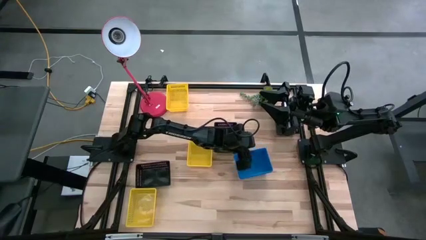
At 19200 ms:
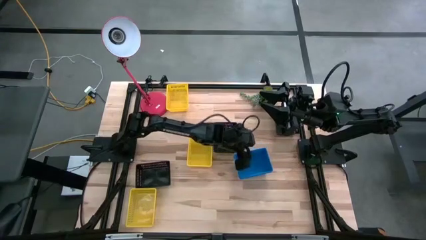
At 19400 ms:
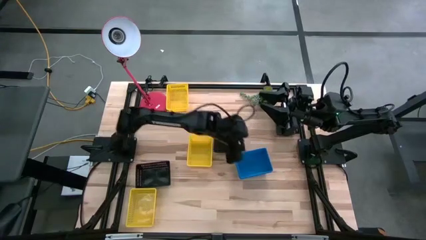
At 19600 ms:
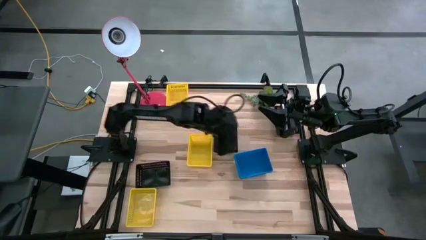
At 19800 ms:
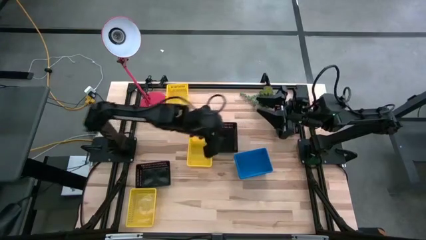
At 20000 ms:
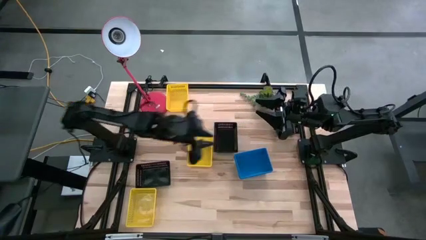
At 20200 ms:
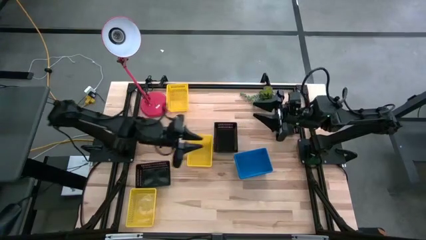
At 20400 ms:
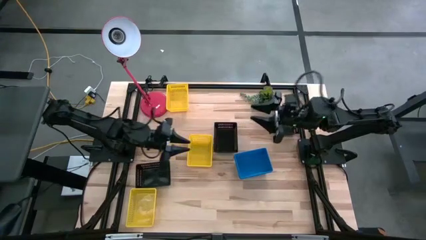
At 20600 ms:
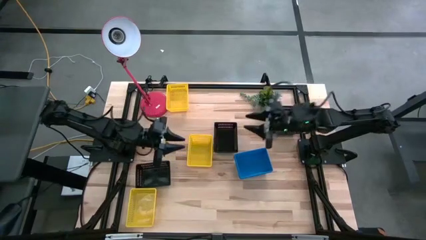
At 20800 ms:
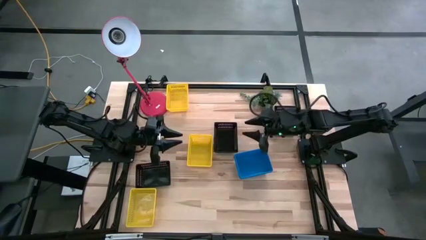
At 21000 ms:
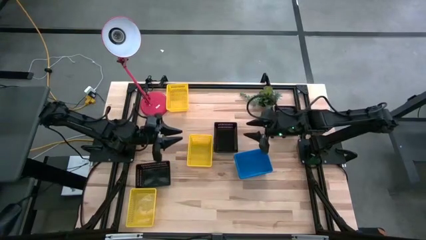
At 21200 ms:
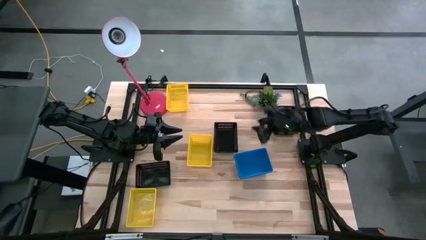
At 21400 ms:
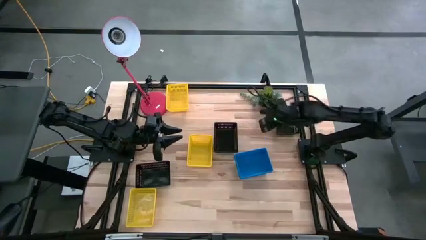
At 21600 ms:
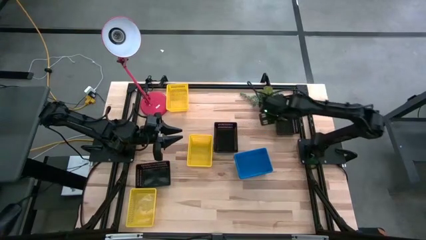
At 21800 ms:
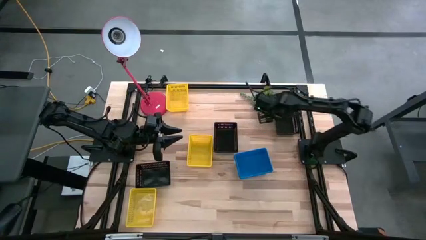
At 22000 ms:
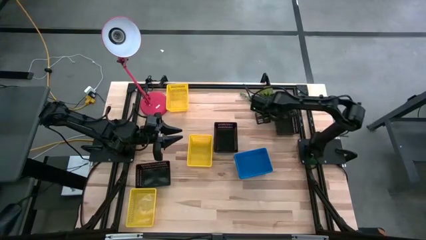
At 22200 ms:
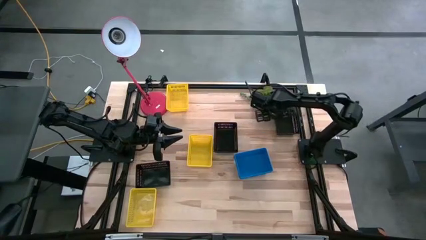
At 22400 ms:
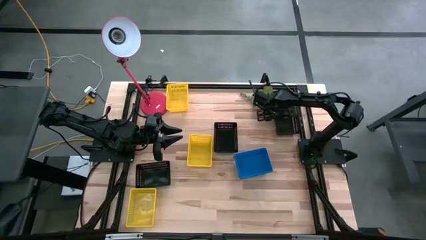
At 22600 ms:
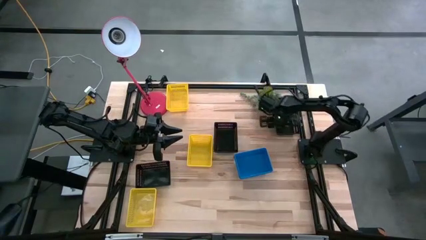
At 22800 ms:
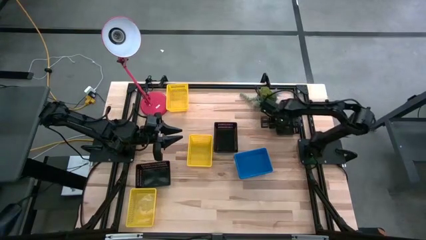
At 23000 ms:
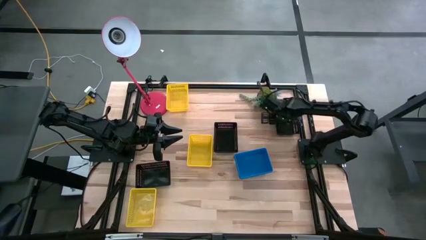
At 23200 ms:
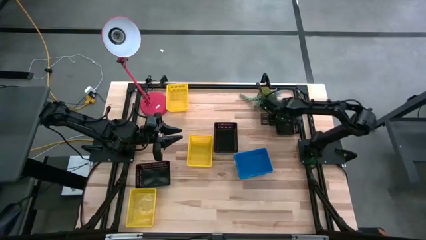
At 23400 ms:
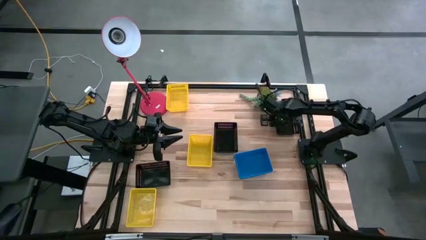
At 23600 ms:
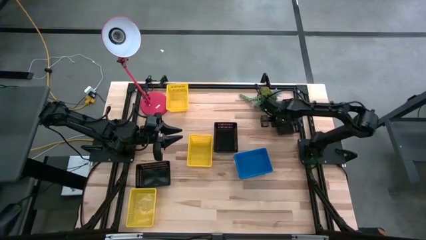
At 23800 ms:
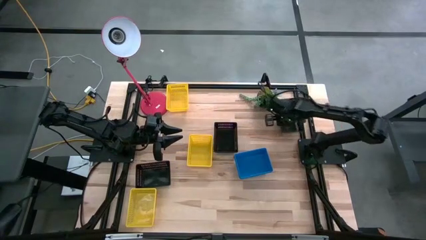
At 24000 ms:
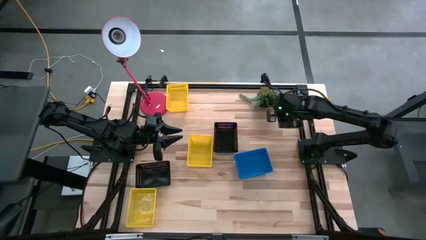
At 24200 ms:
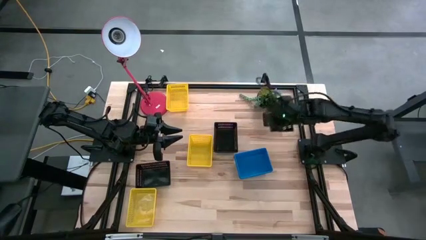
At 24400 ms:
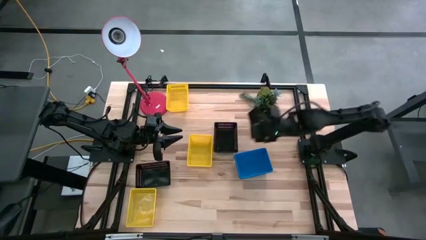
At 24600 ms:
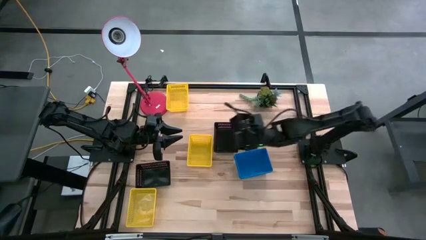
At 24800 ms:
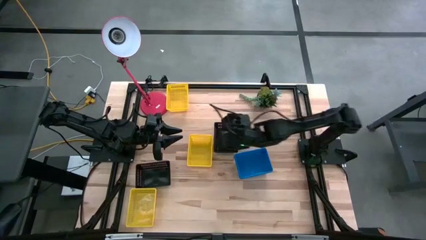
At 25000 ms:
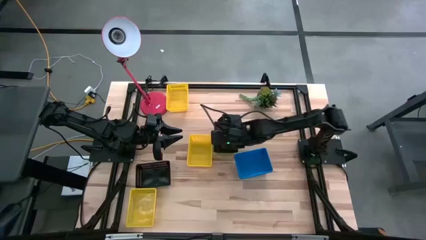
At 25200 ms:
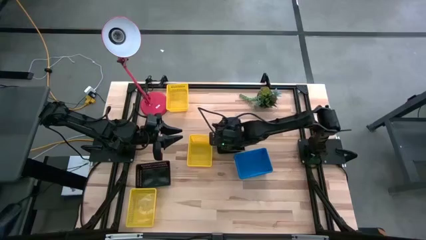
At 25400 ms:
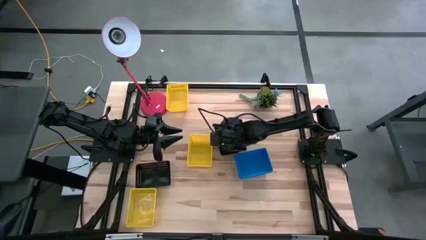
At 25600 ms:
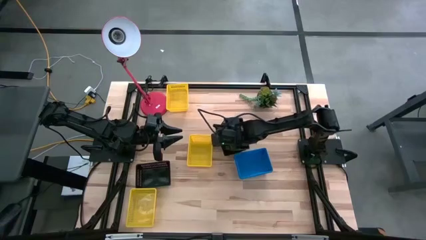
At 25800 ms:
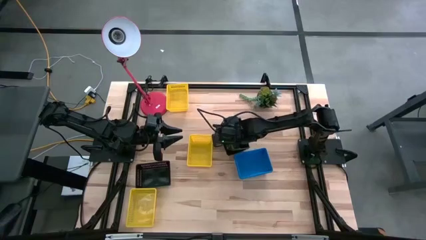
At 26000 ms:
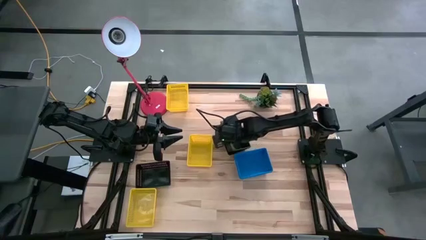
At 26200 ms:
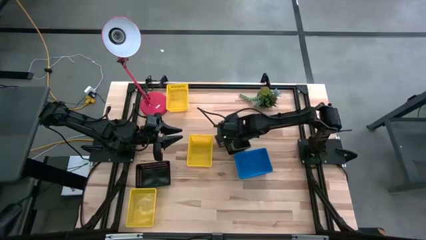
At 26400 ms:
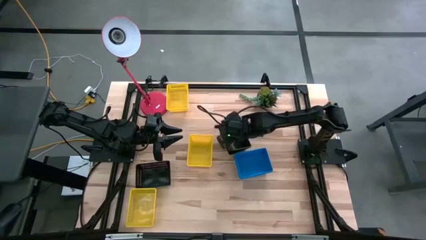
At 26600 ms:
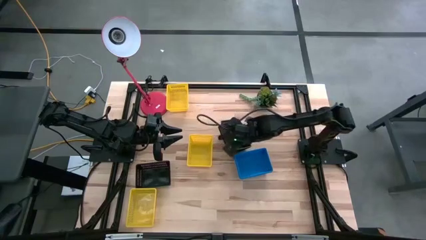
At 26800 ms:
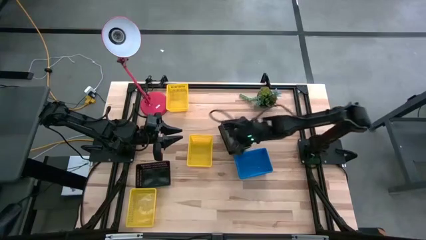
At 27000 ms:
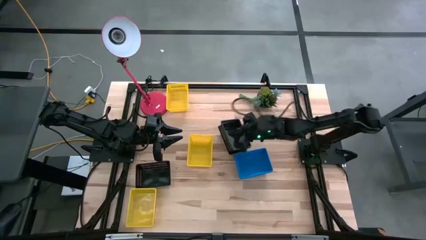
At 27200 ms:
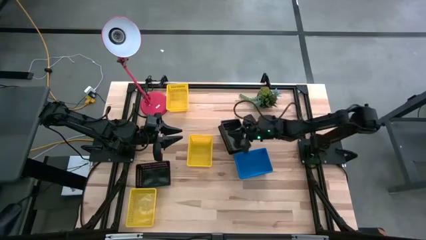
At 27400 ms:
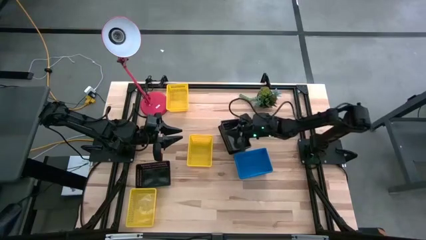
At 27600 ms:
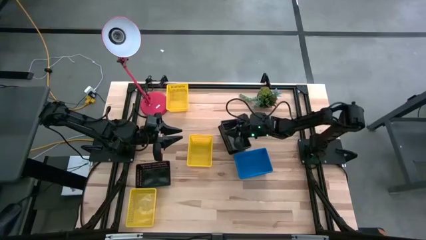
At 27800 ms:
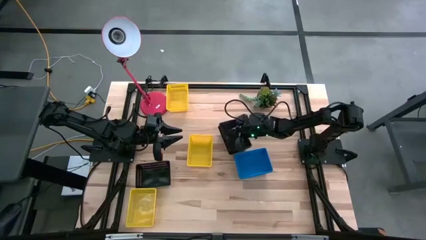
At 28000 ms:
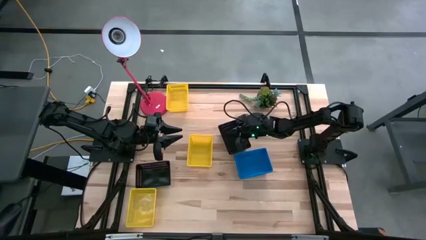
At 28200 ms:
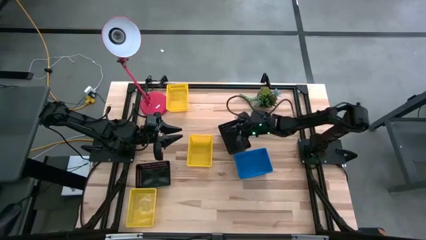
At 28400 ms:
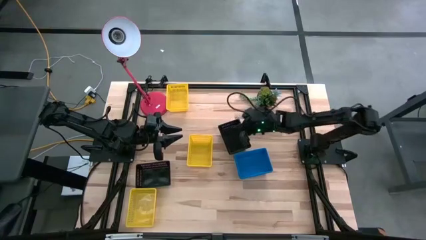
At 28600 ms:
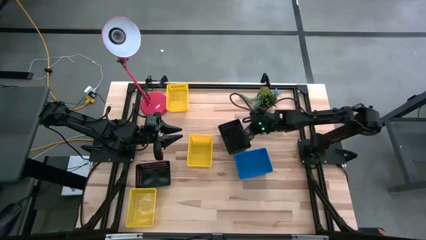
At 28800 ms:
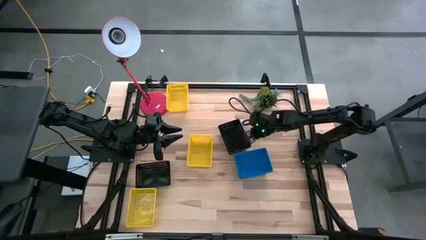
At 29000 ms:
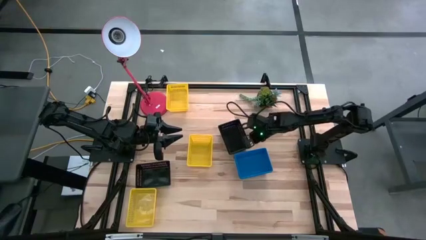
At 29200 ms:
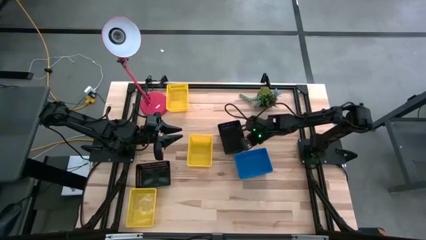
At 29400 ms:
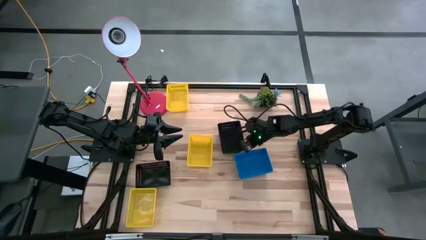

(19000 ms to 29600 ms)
Stack the right black bin on the middle black bin

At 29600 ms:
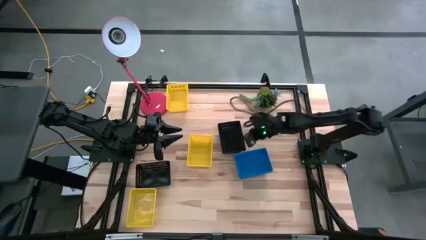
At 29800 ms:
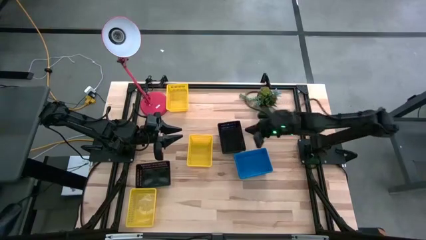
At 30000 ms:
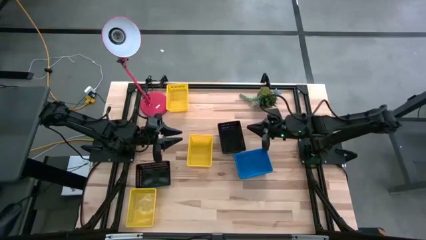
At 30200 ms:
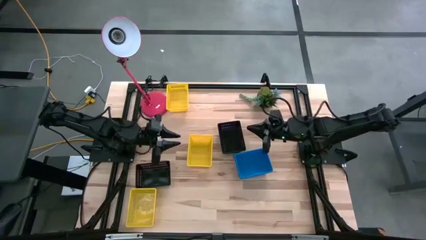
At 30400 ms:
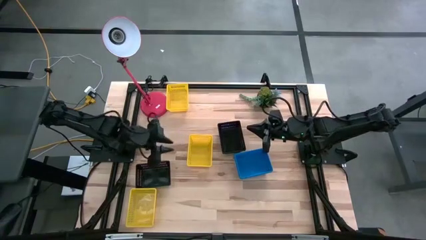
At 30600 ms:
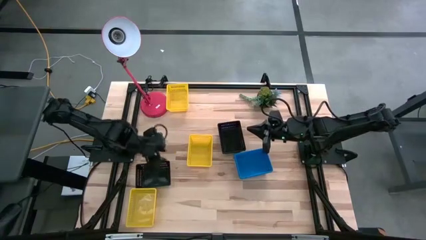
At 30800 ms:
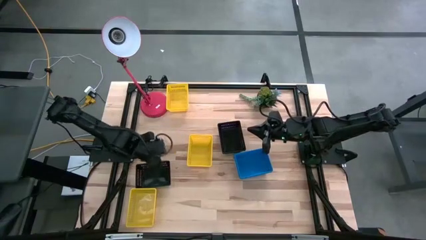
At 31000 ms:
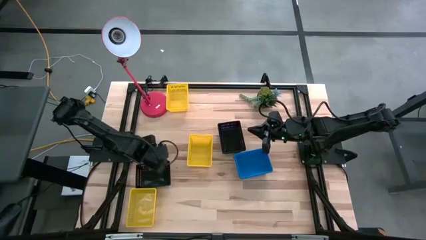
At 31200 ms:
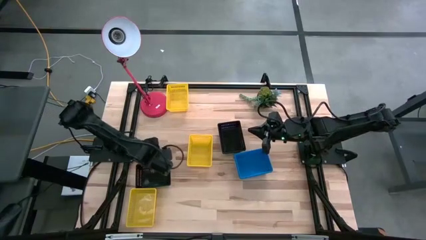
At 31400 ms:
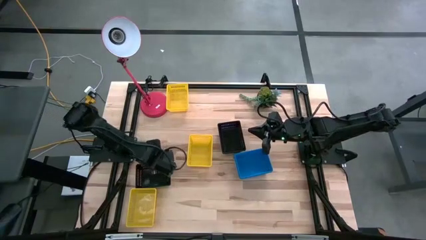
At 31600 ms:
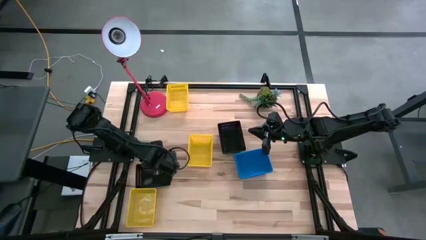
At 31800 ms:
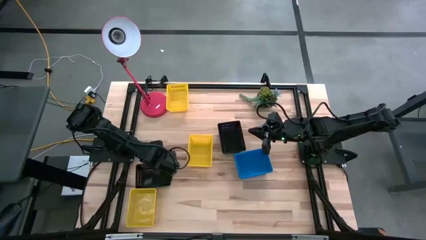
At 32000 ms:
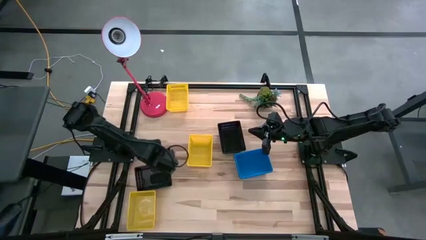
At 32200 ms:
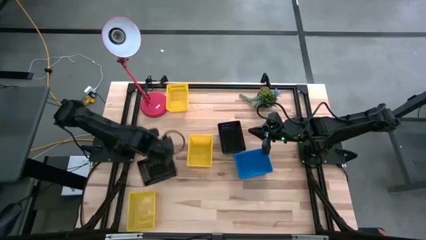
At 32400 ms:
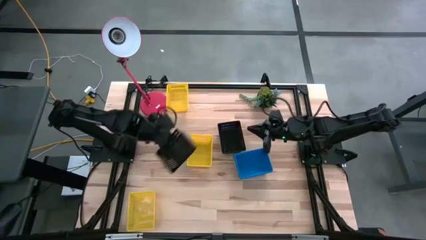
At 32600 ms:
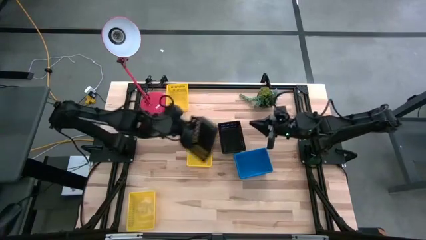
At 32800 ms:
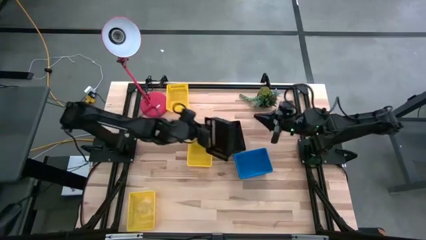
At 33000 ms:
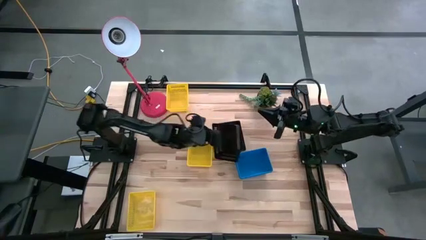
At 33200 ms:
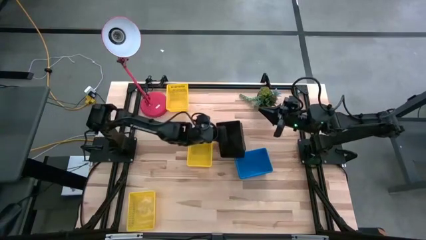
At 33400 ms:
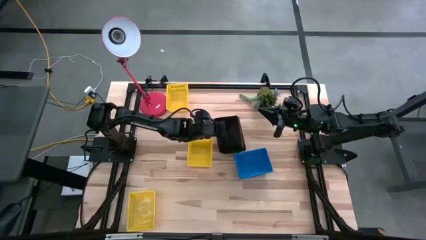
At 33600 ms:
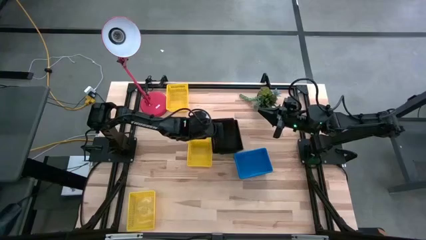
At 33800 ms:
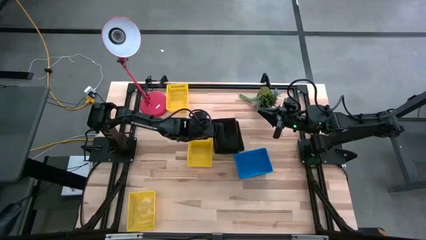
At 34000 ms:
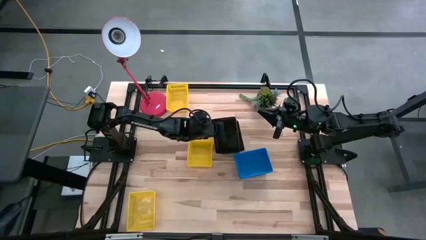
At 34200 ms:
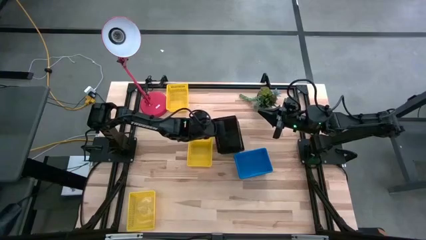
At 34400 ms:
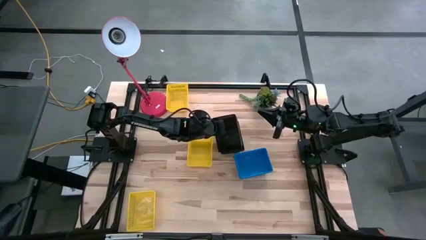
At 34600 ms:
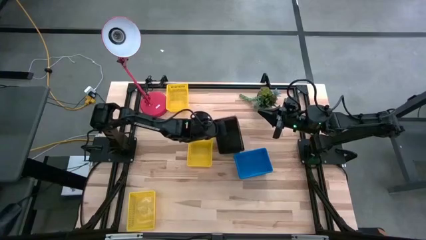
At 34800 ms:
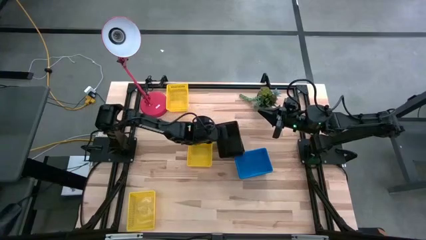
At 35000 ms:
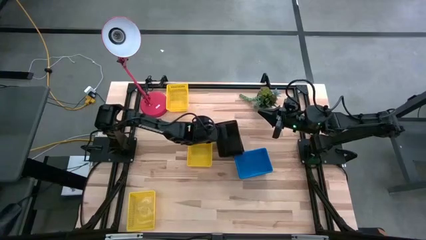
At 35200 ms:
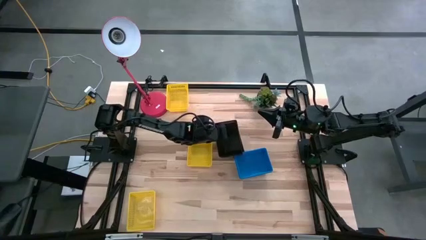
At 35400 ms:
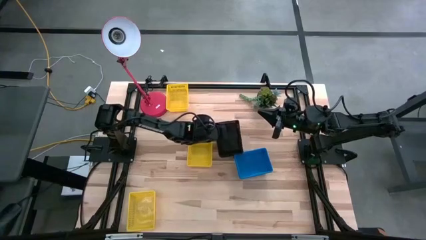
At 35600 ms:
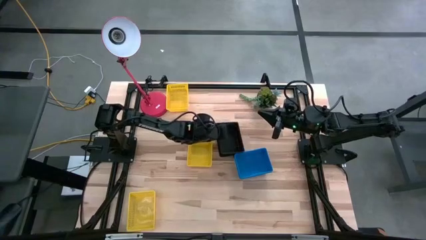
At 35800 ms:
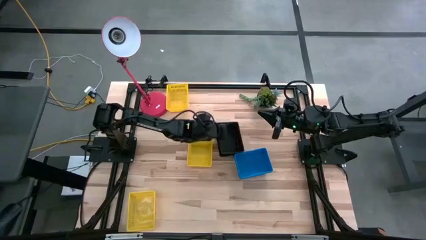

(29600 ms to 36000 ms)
Stack the left black bin on the right black bin
